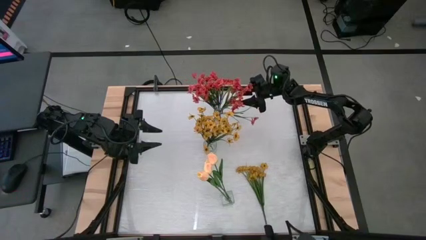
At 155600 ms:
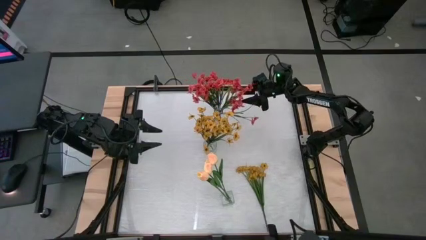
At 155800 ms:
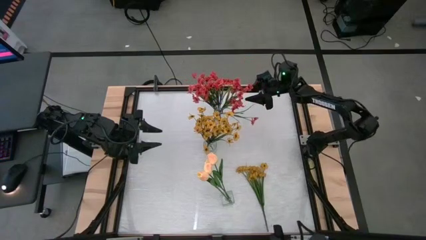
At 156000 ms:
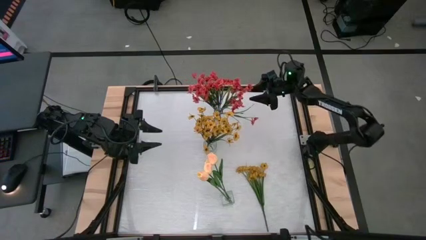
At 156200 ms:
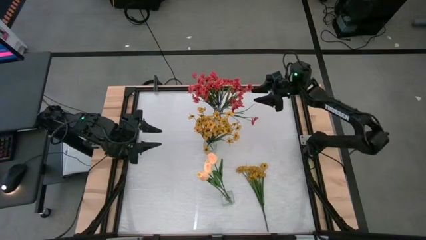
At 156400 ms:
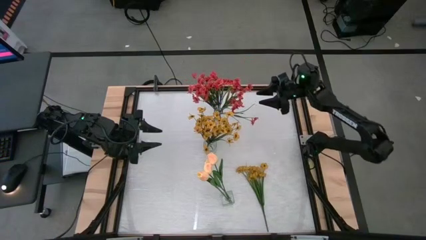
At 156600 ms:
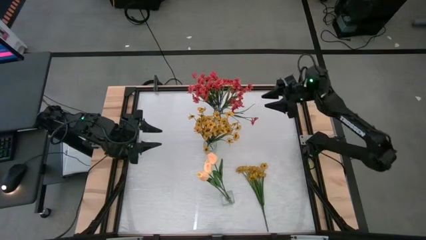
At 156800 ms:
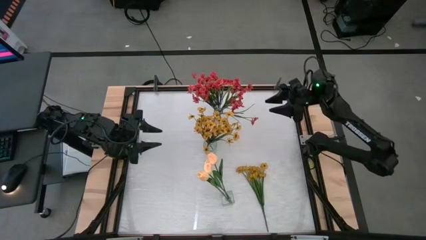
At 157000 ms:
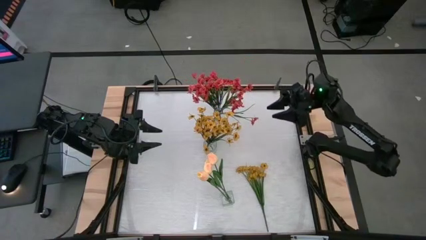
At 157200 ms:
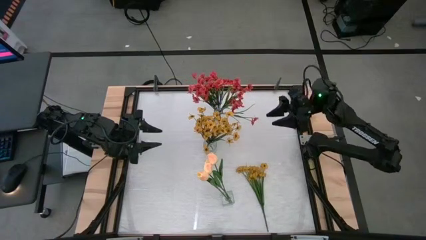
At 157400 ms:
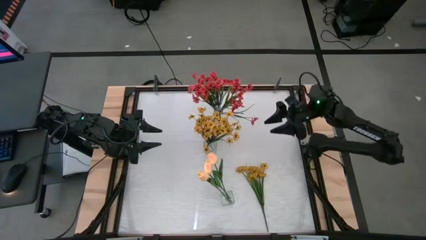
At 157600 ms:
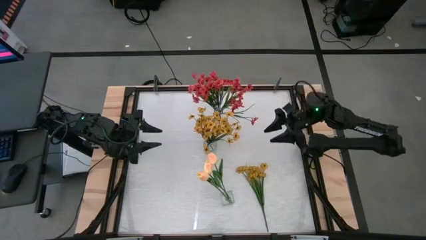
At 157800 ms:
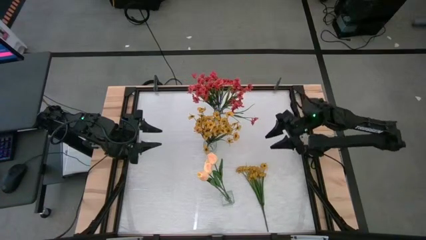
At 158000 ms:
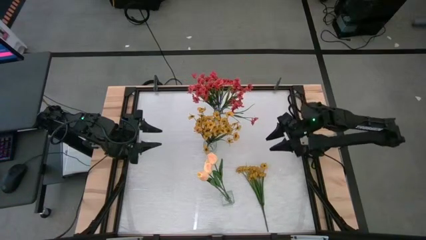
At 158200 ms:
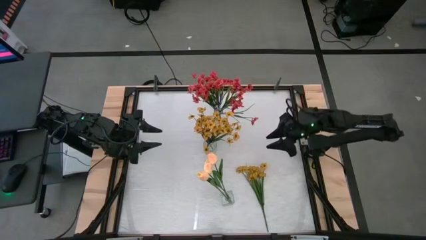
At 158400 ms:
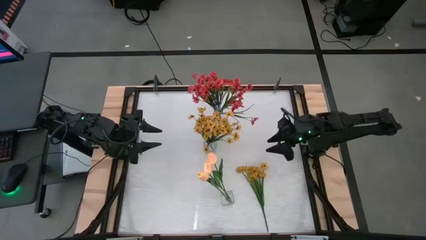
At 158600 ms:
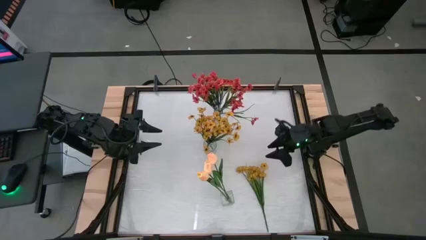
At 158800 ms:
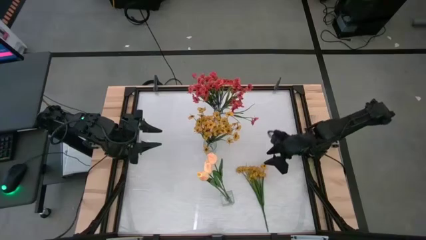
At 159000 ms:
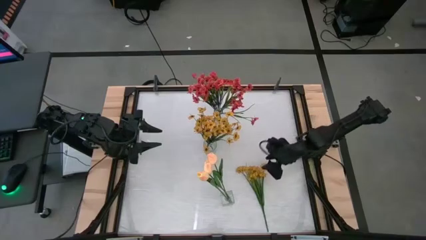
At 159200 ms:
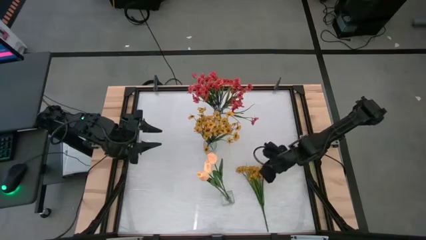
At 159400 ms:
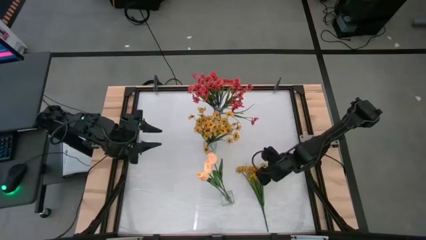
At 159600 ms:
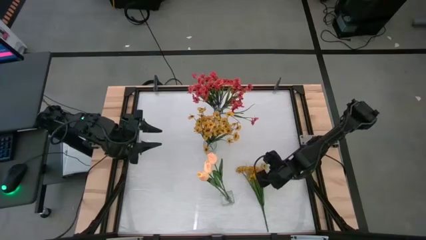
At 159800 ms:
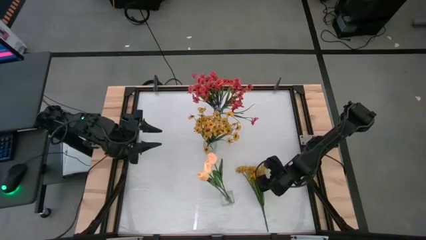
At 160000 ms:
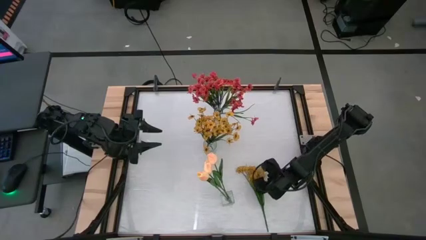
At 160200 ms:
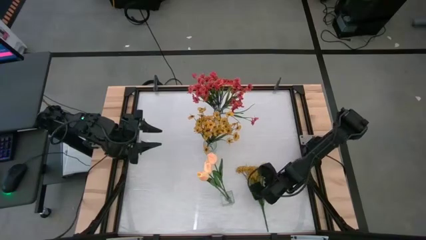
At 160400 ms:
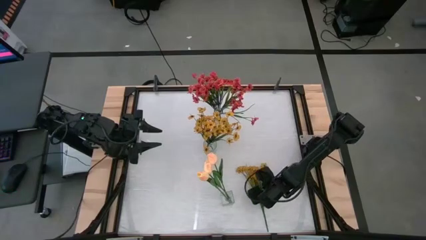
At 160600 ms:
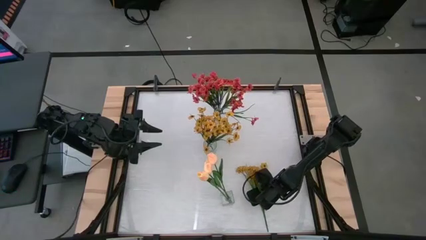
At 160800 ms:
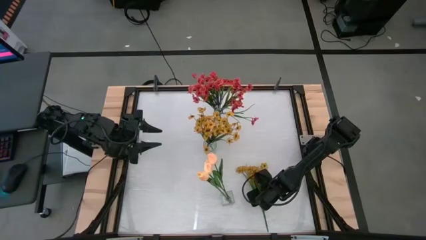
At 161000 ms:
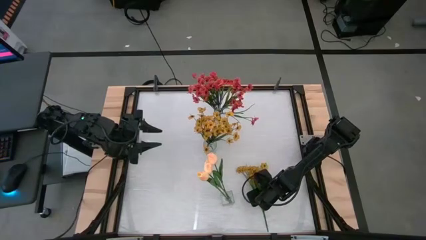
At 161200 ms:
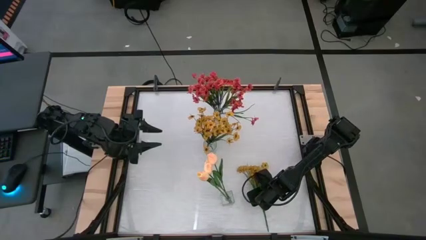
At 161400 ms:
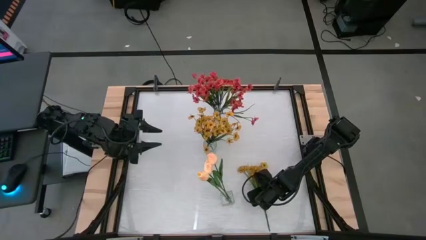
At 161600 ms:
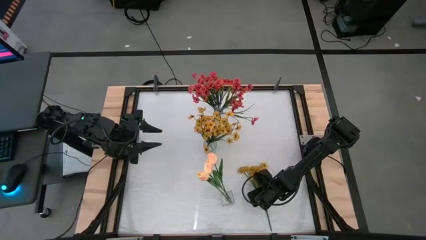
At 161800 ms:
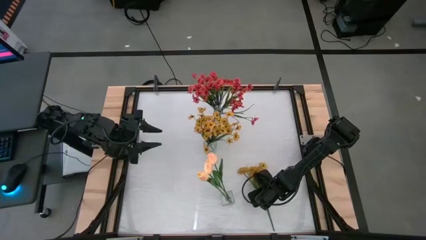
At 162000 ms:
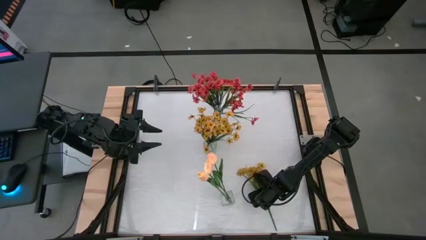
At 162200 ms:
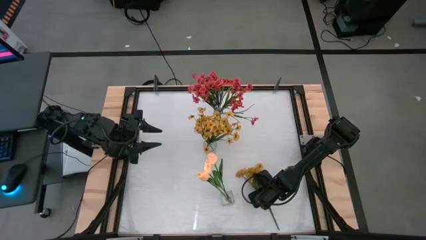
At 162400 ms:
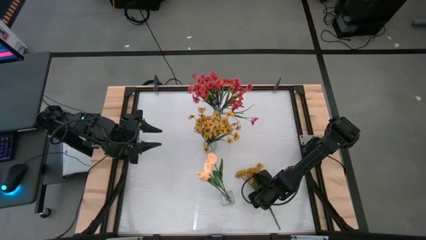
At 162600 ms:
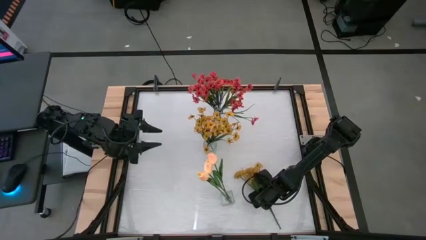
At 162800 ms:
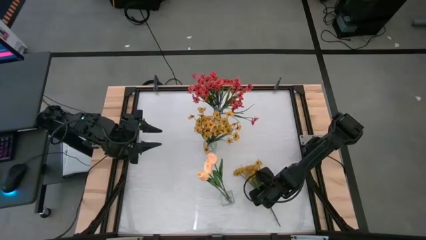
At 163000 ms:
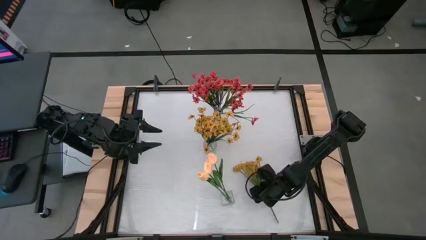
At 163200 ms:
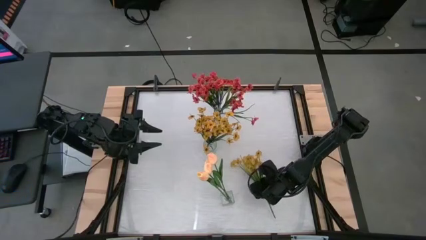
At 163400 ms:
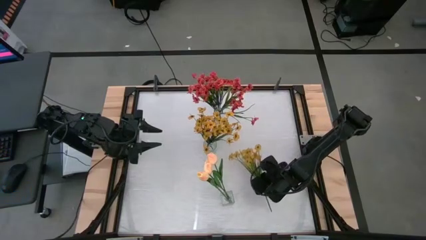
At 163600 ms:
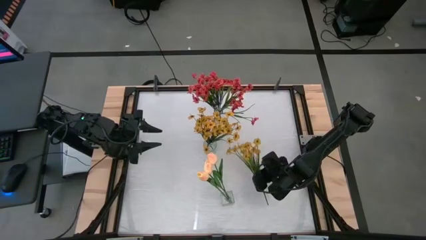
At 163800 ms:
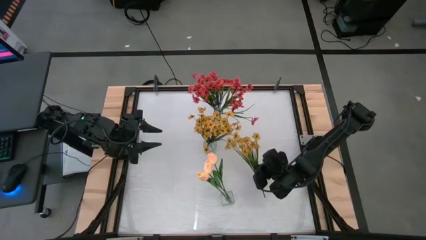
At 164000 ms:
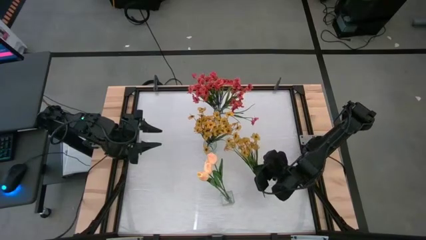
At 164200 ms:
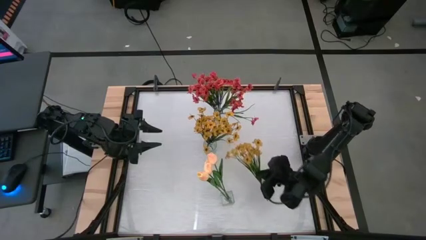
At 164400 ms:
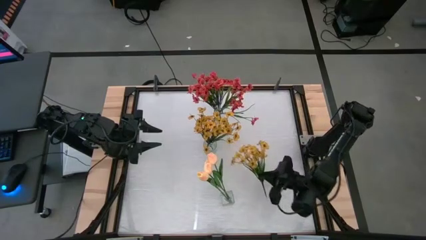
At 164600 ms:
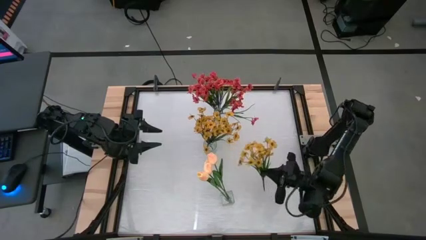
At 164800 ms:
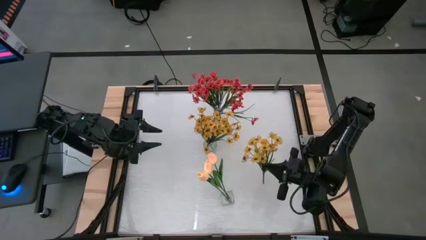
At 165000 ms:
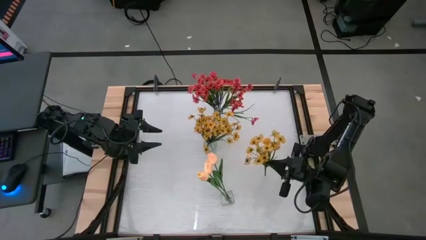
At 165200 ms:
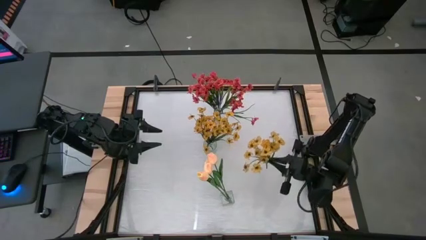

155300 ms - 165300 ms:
Task: Sort flowers into vase by color
Put the yellow flowers into the middle transparent vase

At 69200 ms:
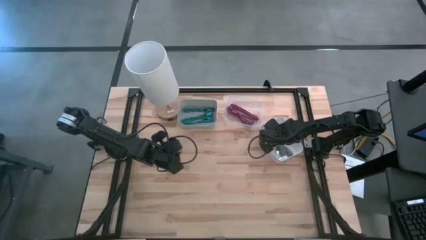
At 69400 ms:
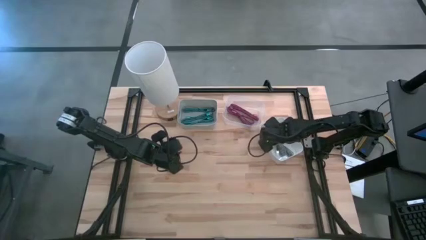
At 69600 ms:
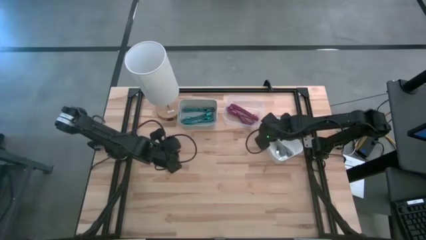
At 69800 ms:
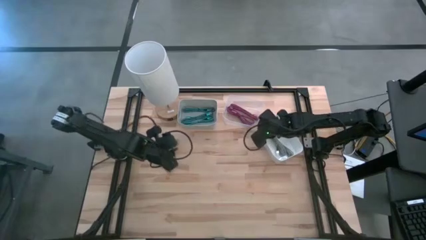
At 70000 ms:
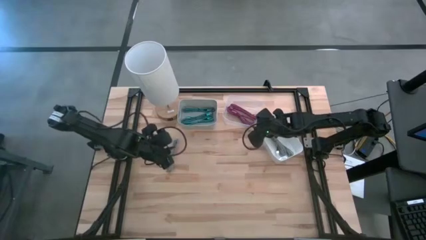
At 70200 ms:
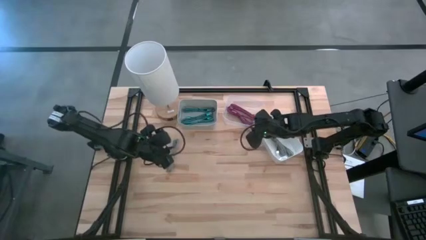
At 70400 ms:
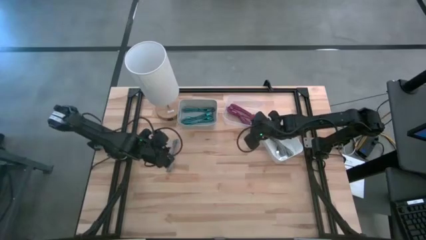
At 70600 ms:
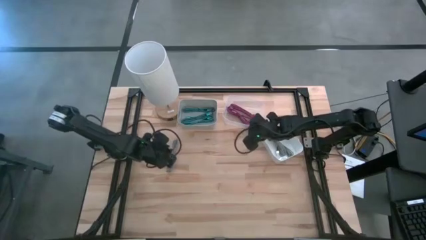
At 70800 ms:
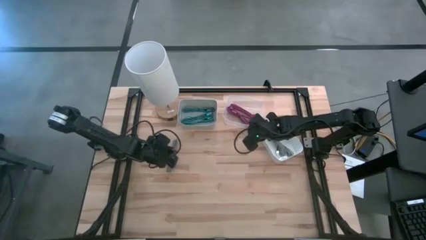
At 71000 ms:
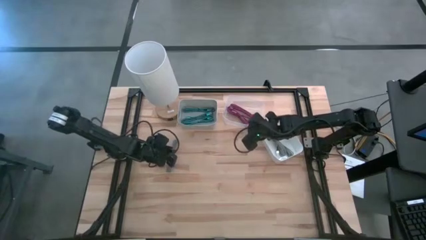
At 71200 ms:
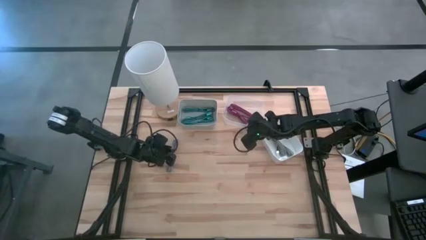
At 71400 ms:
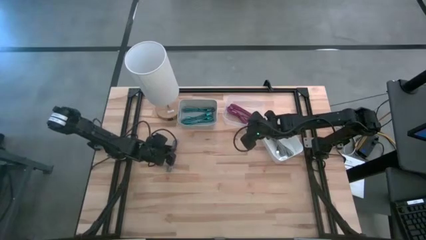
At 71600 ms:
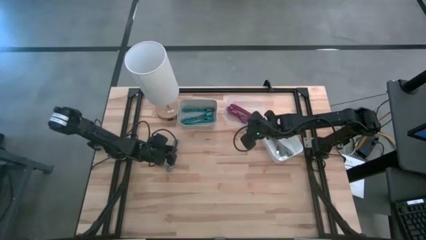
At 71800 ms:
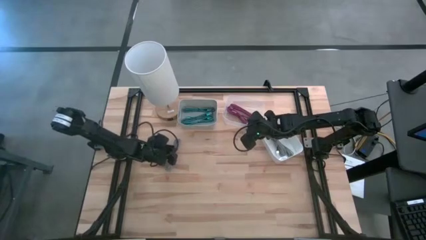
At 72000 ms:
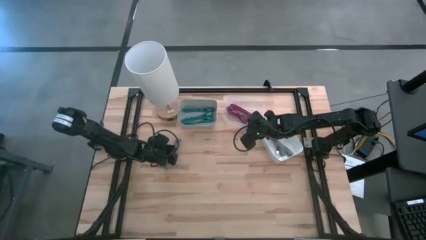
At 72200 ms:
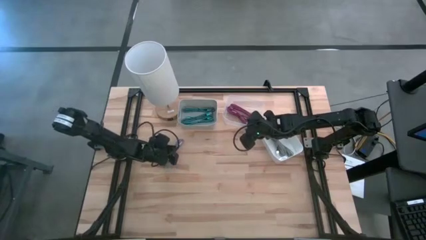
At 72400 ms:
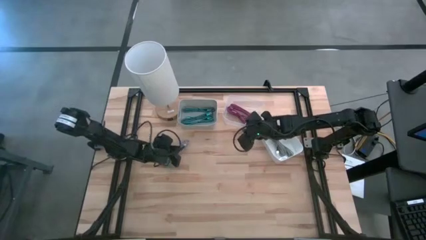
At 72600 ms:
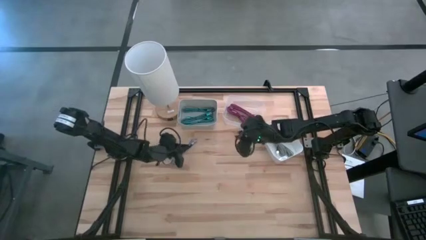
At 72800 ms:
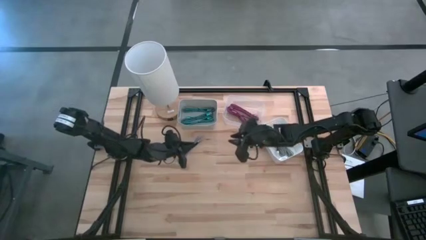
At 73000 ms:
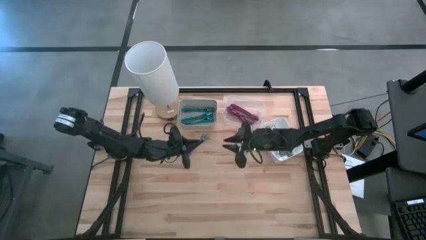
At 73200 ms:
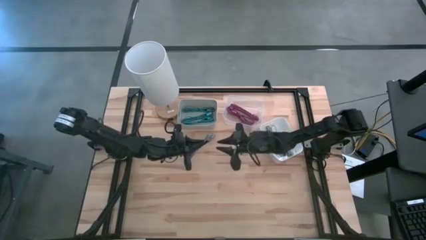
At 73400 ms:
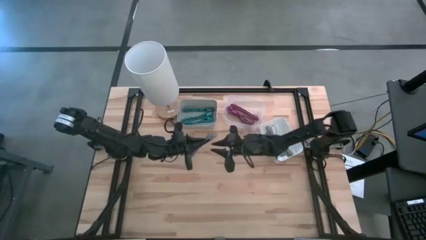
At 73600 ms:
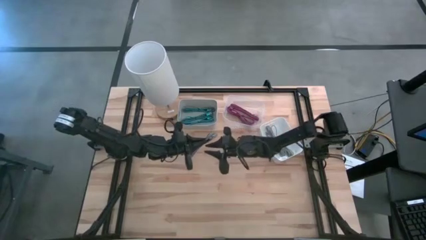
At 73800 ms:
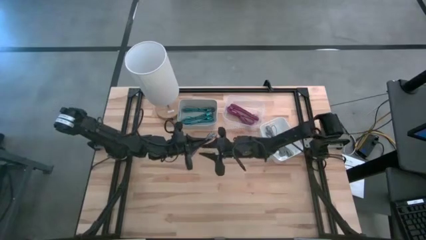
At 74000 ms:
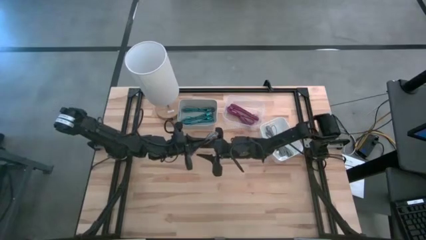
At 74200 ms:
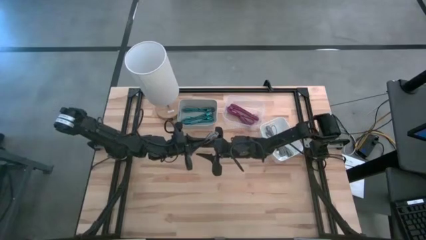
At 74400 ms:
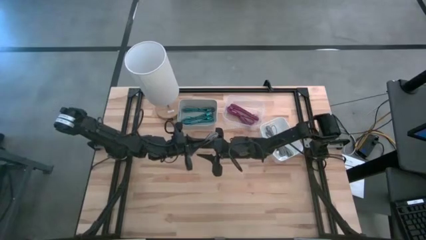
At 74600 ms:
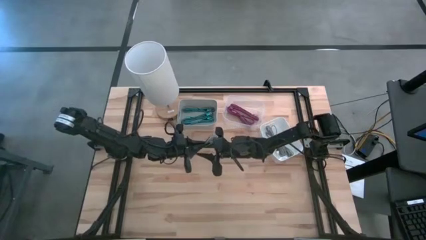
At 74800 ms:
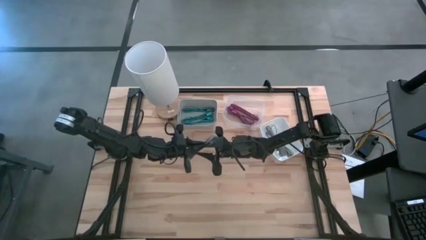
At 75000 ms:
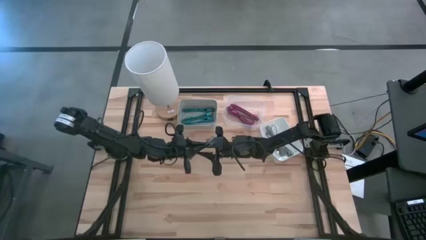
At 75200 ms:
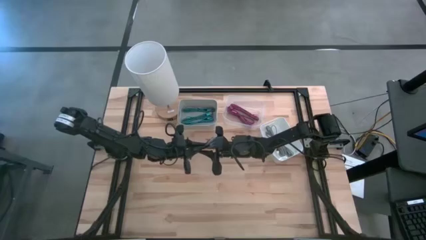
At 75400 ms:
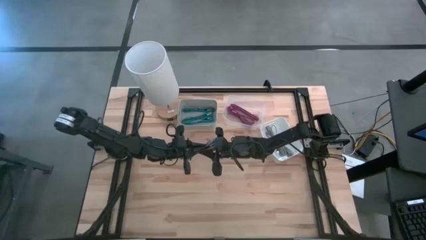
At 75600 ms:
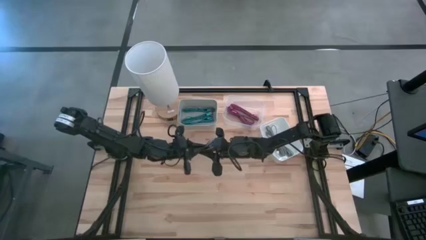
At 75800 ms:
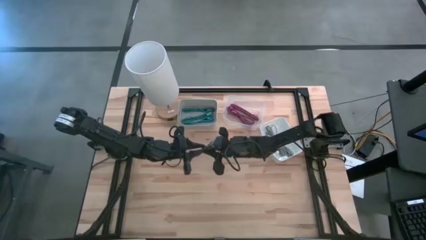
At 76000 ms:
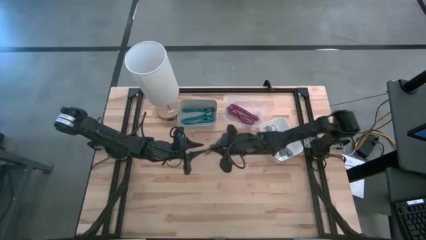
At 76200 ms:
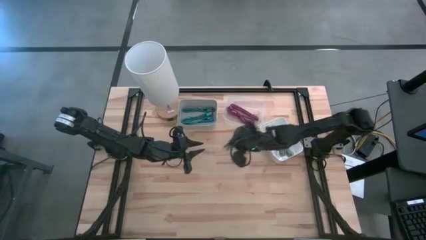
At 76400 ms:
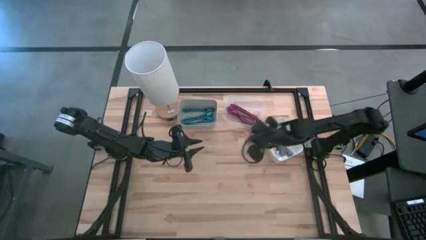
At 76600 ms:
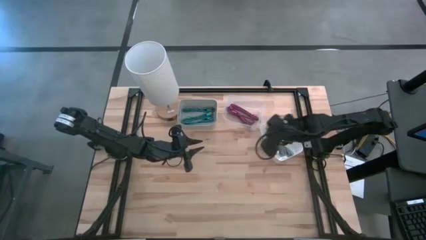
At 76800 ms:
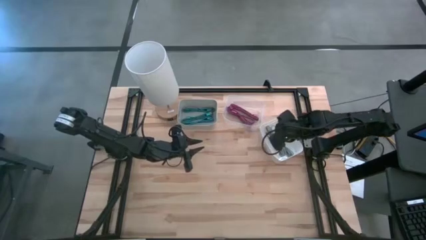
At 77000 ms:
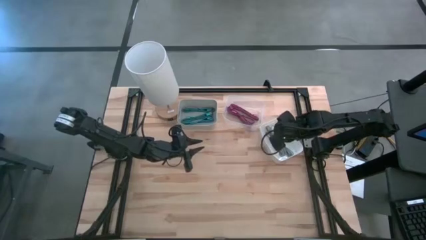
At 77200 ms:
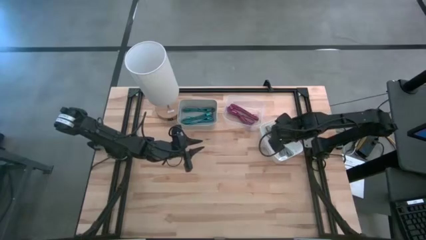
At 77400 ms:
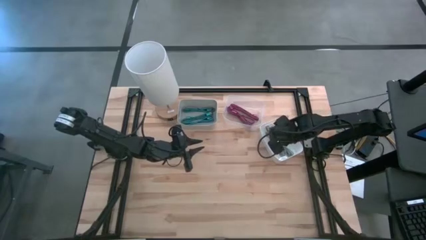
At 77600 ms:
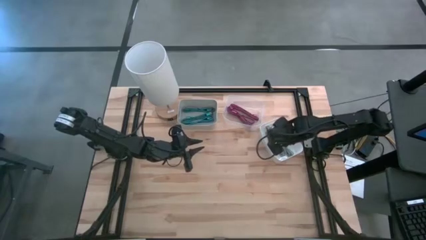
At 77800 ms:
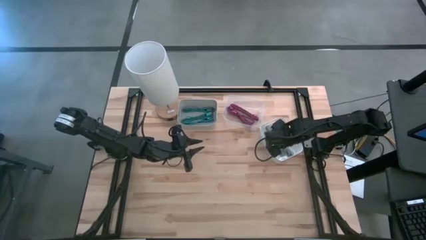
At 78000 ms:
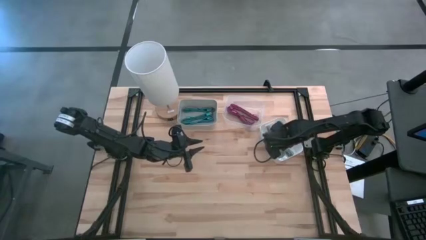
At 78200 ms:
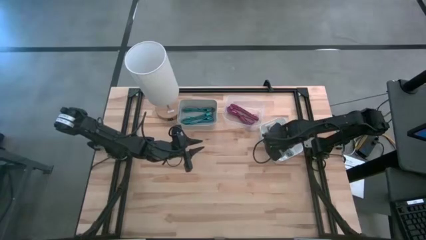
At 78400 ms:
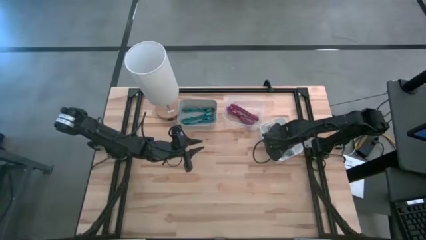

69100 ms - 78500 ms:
Task: Pick & Place USB Port
Put the black and white USB cable into the white bin
